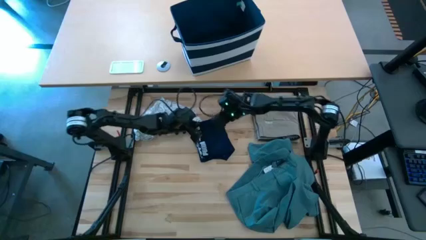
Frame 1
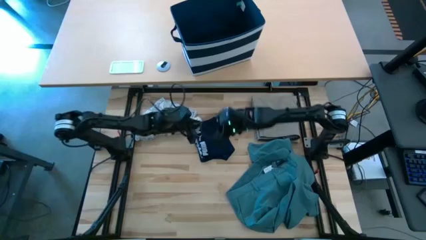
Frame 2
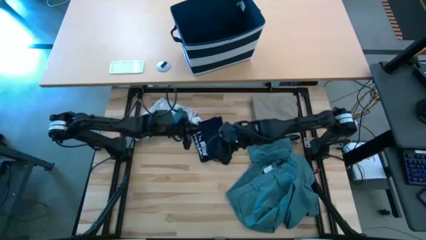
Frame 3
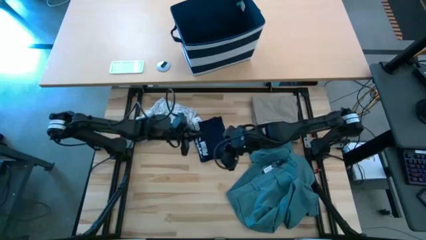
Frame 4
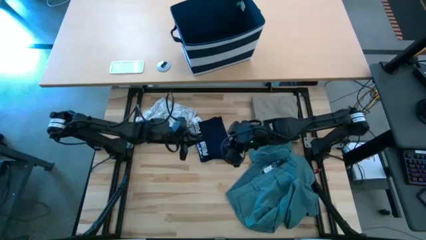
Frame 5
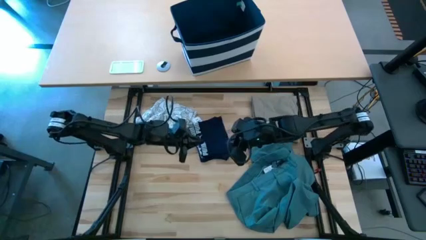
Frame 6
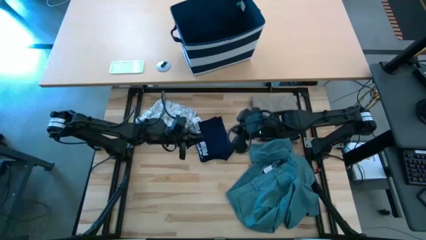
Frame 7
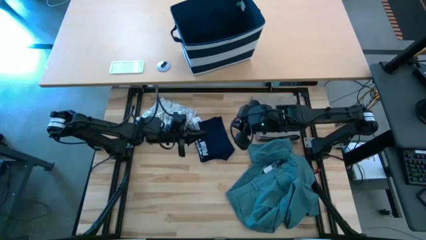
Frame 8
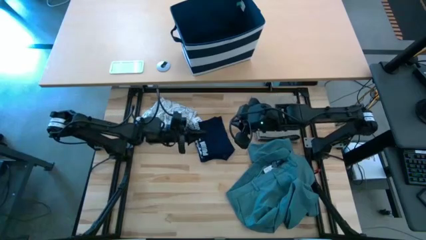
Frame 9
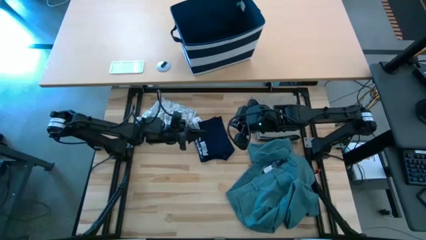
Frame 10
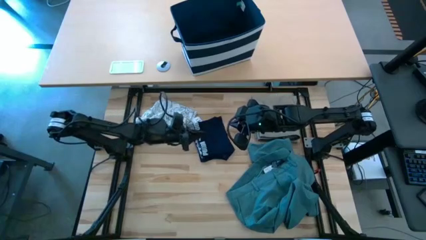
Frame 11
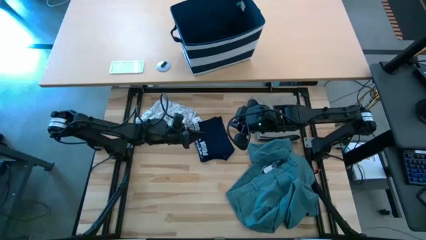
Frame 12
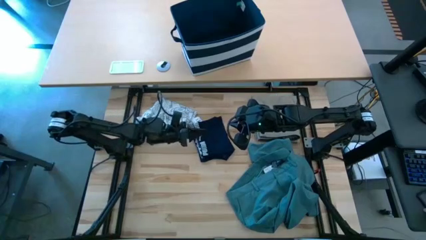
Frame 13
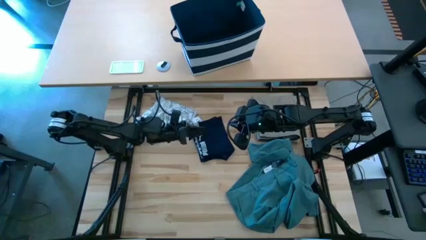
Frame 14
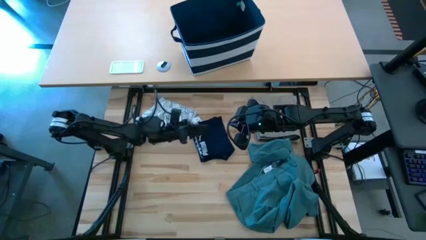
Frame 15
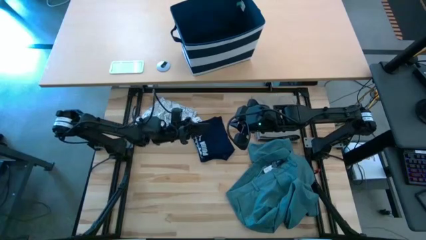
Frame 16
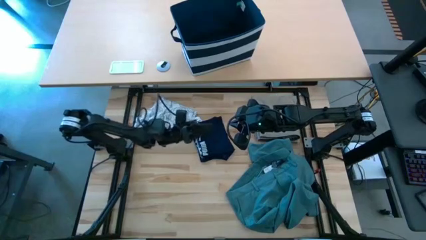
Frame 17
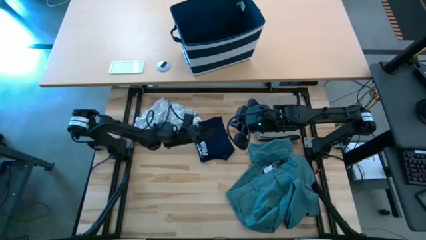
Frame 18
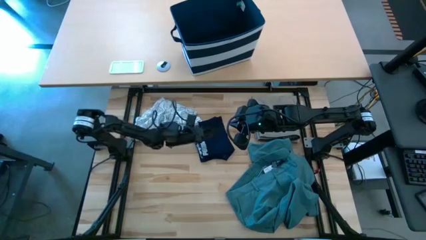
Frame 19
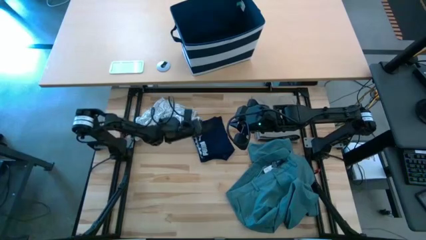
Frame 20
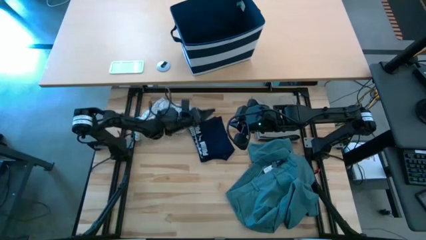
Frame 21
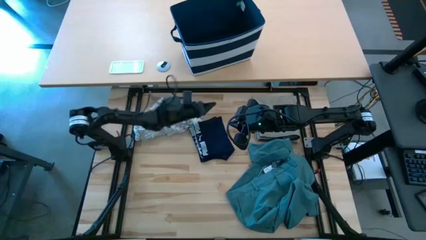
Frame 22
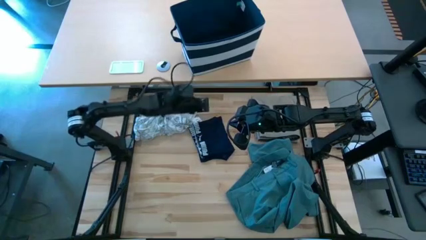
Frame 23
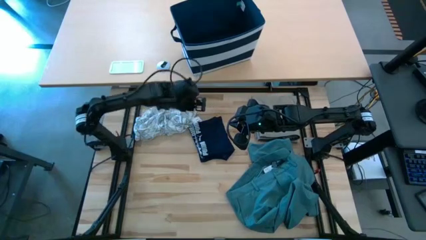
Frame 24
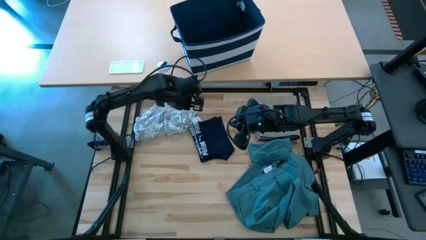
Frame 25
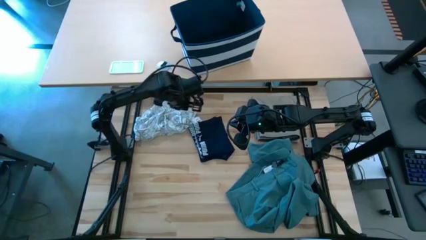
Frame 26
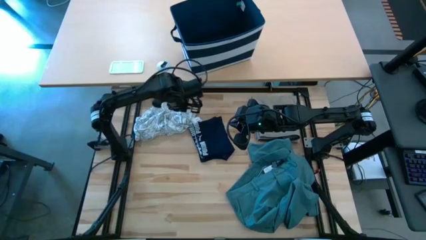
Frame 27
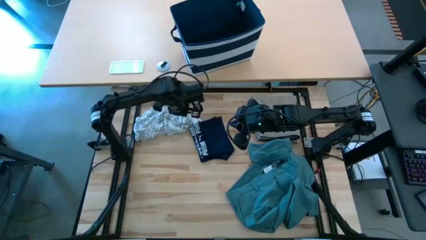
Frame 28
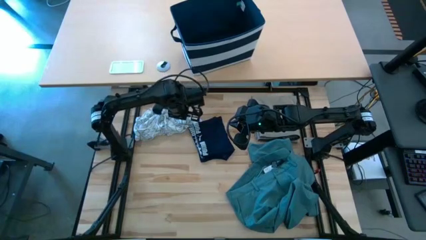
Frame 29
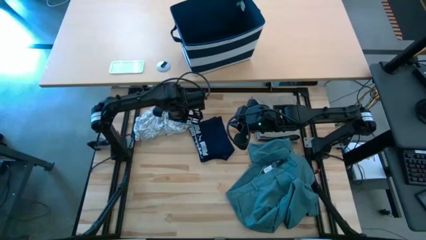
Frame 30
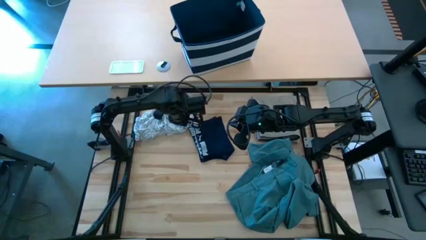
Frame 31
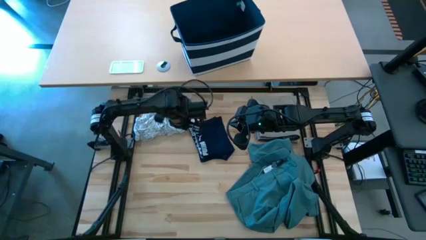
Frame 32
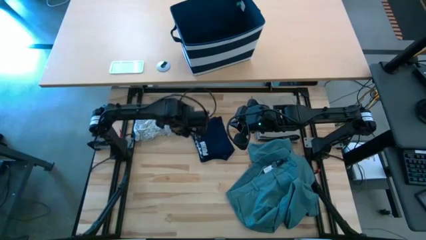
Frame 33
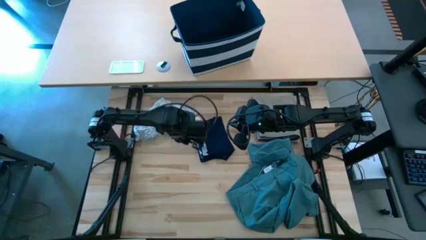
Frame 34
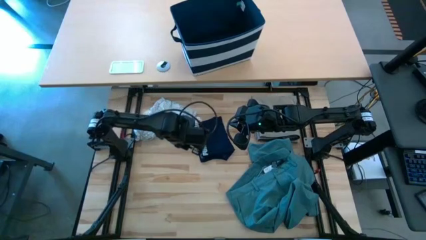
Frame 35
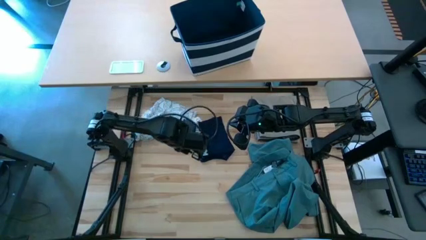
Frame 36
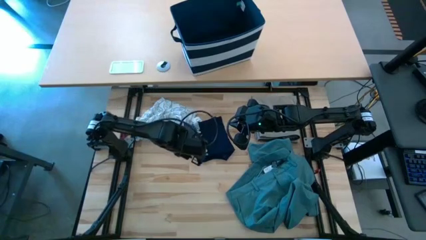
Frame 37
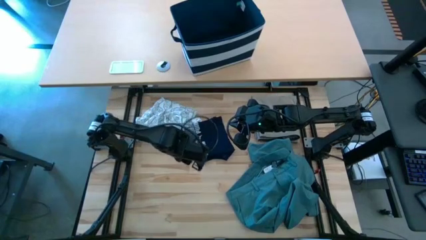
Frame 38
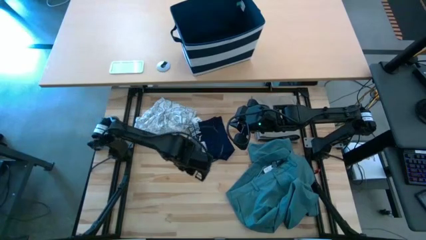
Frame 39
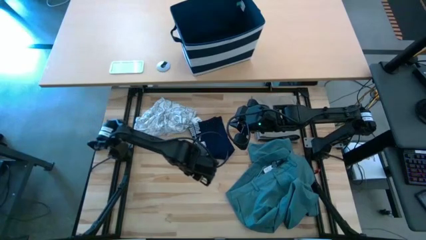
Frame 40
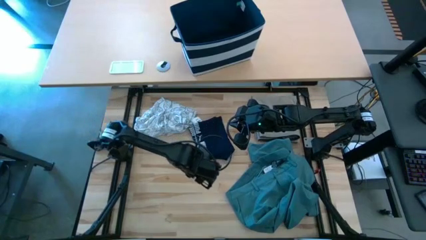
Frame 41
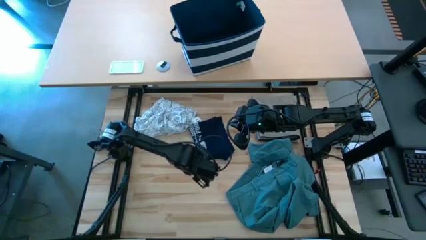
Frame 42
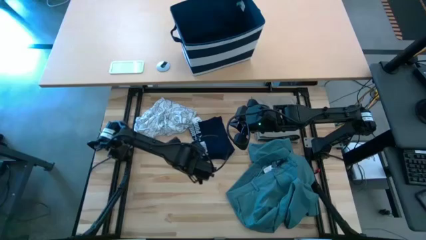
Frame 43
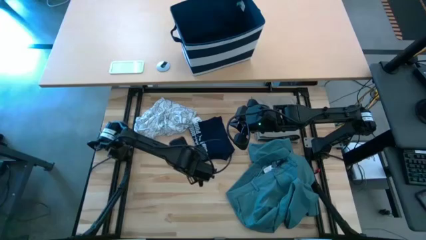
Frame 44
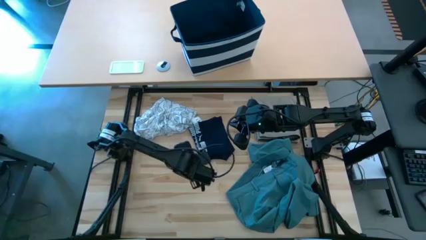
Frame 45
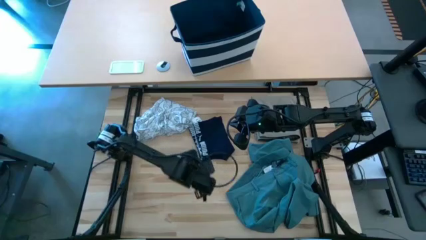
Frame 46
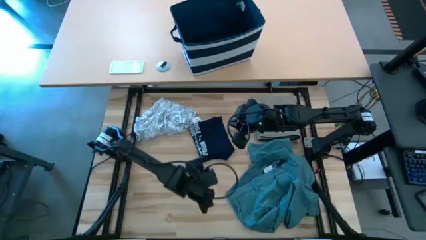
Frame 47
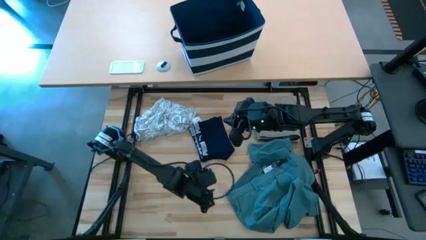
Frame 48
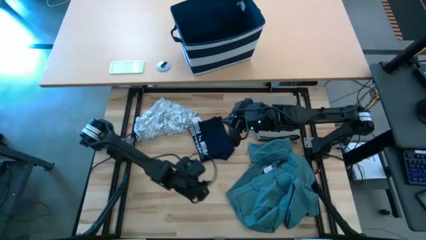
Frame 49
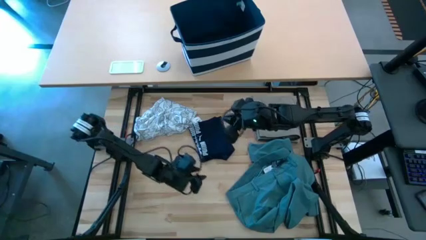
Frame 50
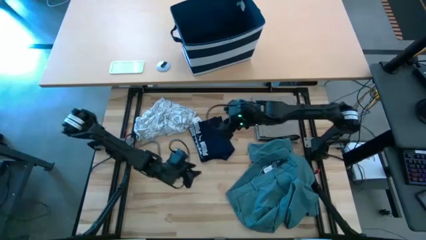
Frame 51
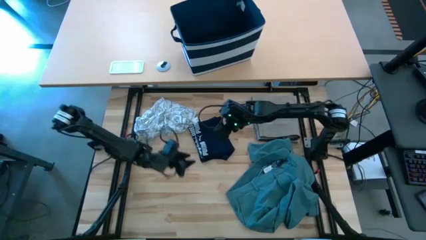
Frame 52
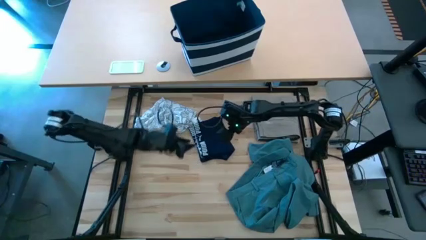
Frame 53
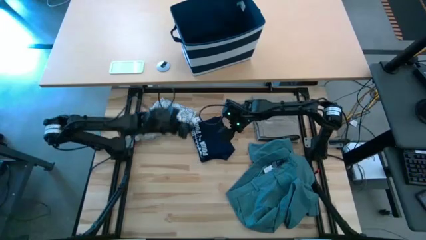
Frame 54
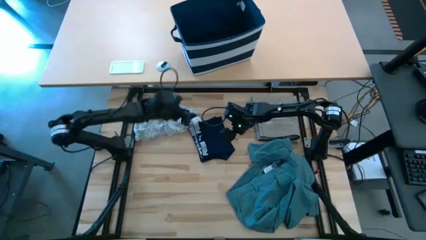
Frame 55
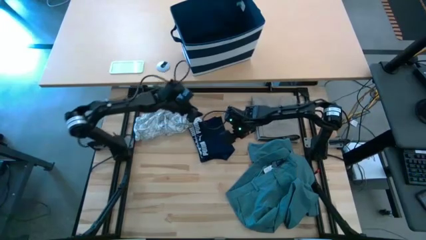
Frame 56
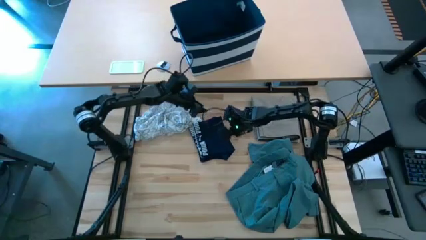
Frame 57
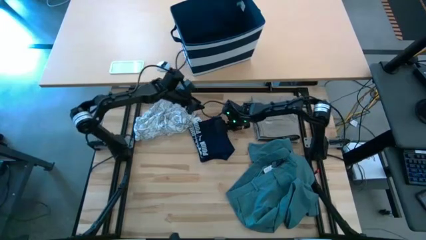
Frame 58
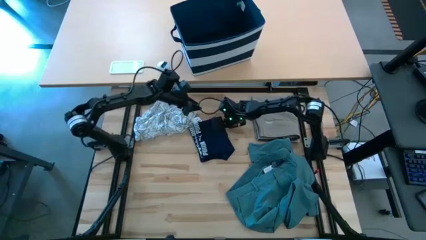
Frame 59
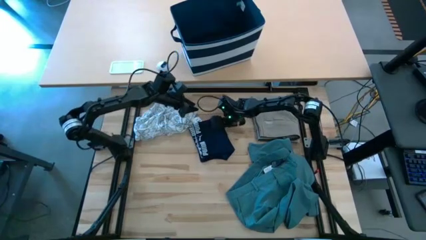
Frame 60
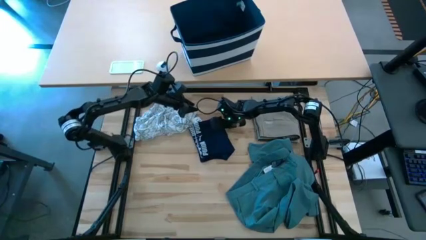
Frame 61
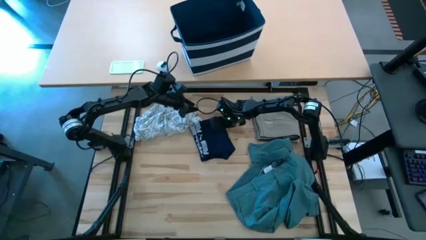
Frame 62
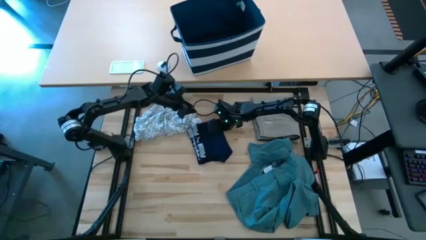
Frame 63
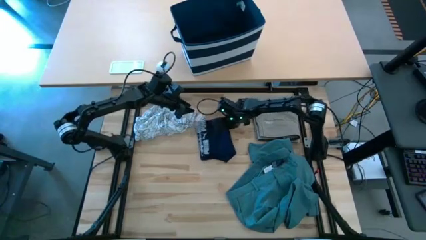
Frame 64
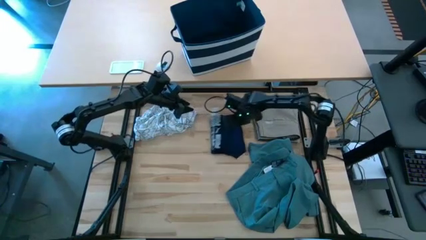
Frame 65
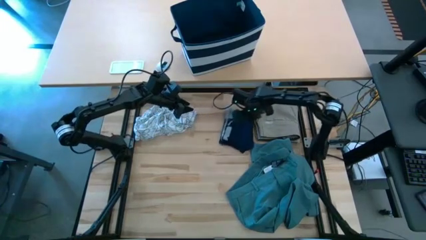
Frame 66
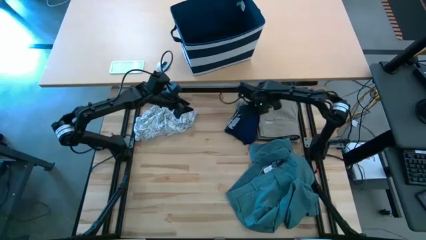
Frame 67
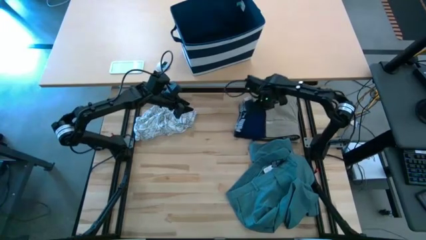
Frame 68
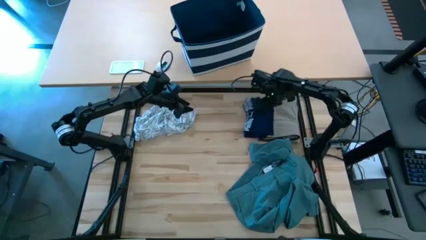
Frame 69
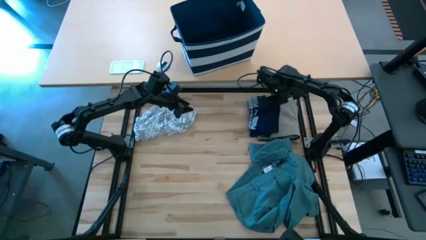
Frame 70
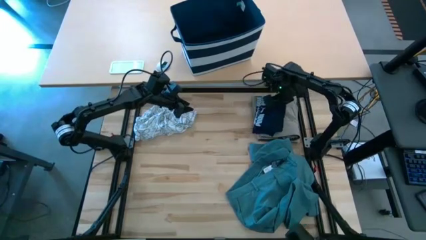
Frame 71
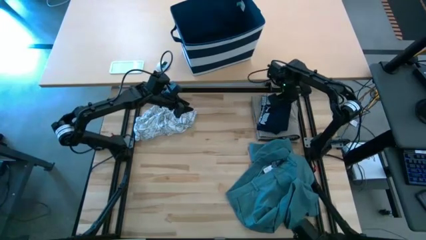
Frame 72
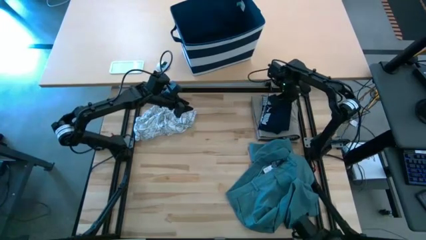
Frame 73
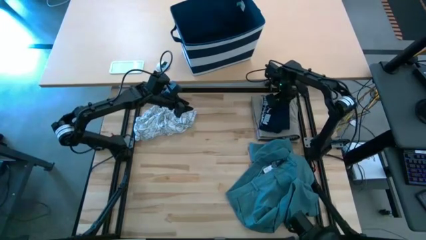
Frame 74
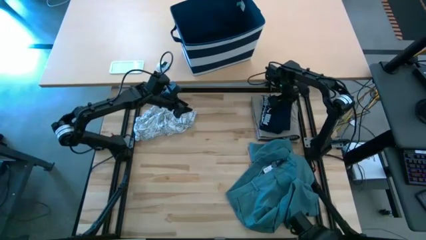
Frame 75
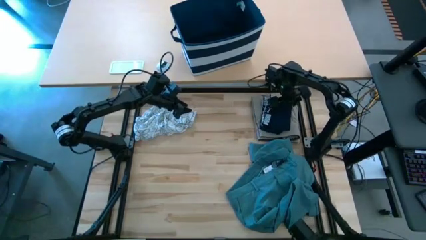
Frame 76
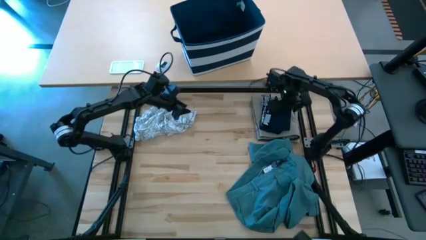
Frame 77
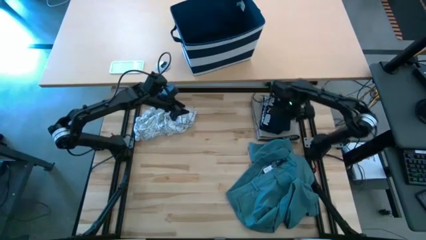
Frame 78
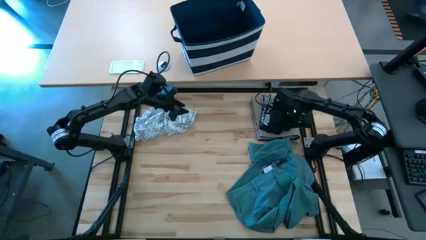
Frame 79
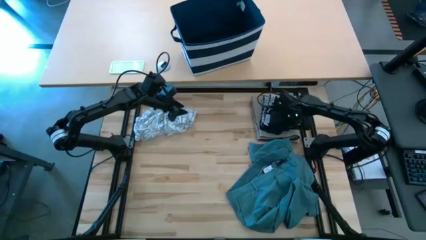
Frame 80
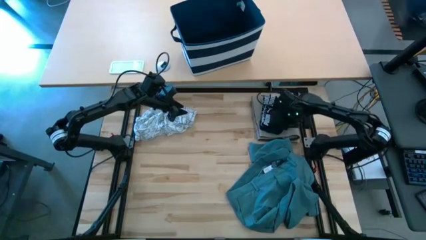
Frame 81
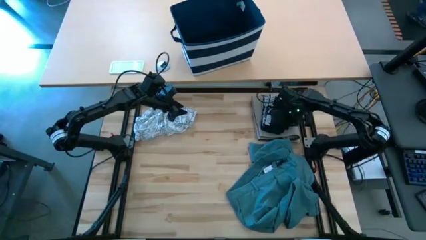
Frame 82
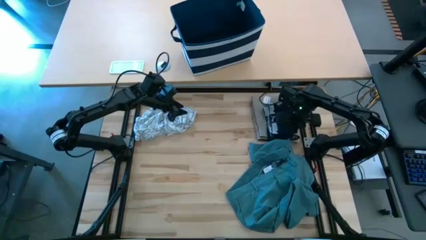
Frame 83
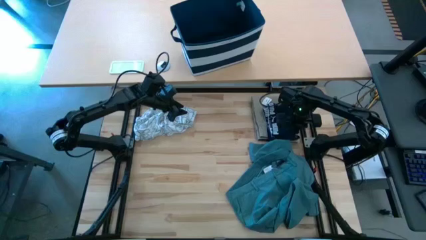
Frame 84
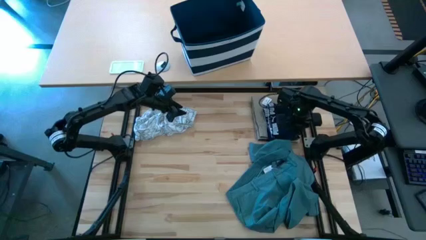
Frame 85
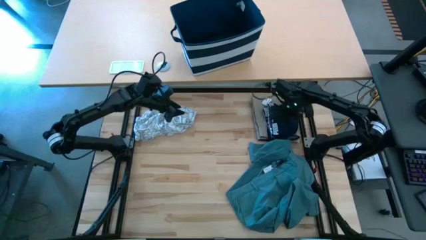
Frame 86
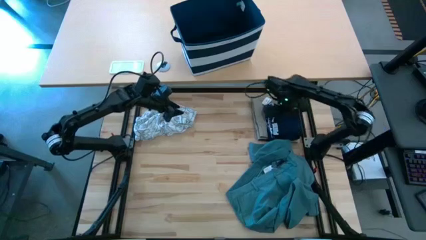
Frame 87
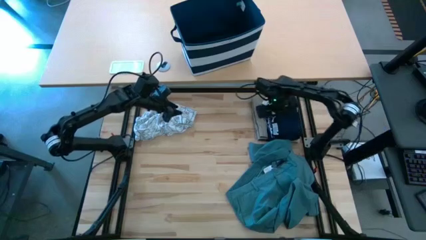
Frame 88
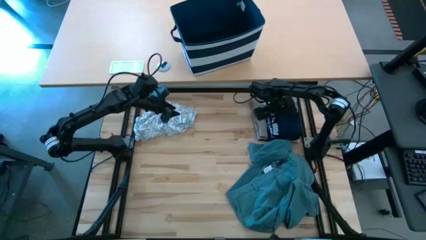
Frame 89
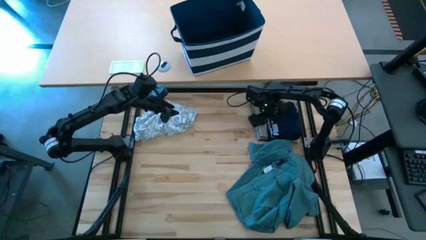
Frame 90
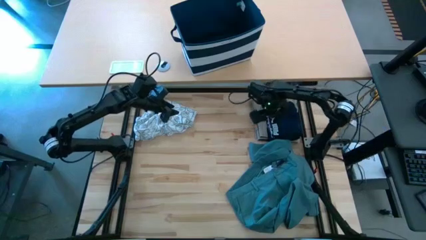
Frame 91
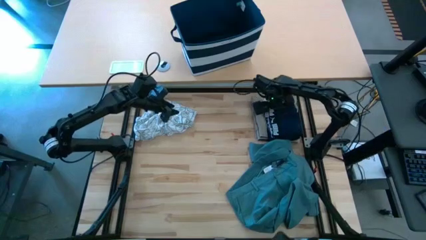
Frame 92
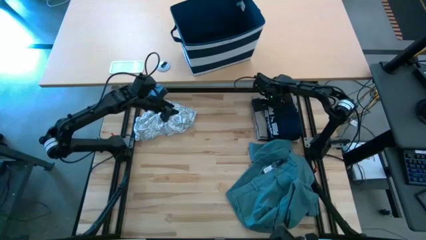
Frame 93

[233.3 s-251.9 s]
Task: Fold Laundry from Bin
Stack the folded blue boxer on top of the folded brown shorts

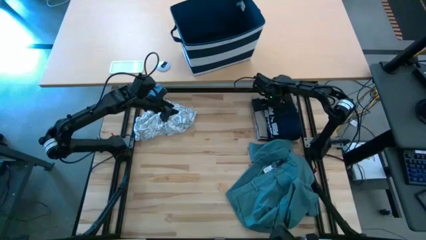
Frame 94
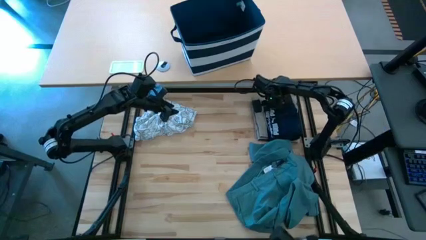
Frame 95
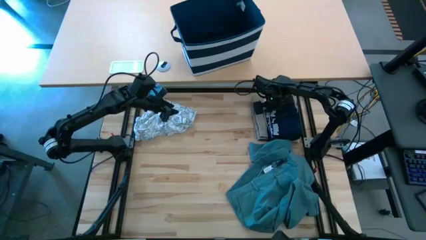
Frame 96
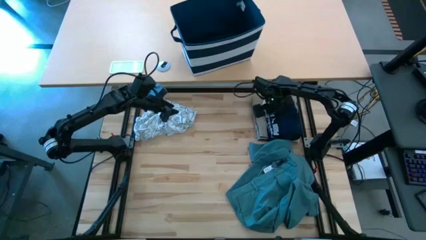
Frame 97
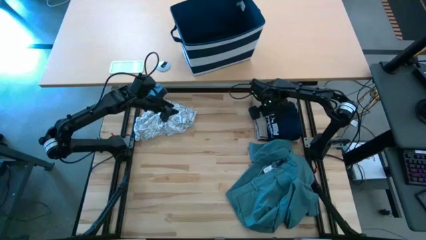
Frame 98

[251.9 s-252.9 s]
Stack the folded blue boxer on top of the folded brown shorts
